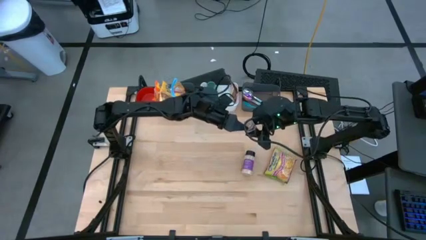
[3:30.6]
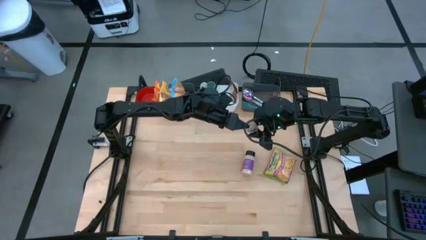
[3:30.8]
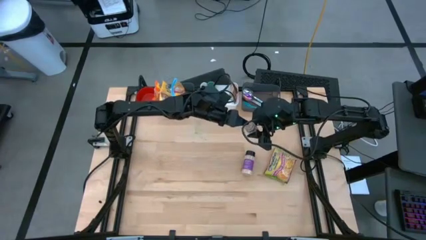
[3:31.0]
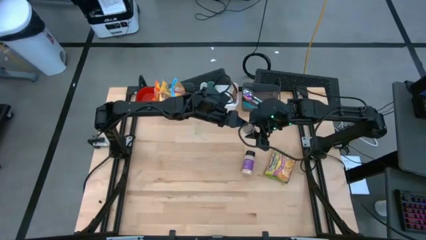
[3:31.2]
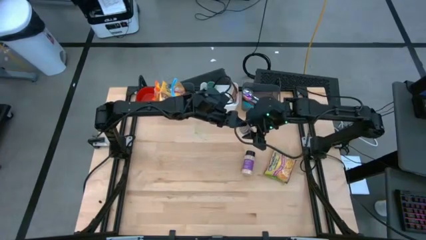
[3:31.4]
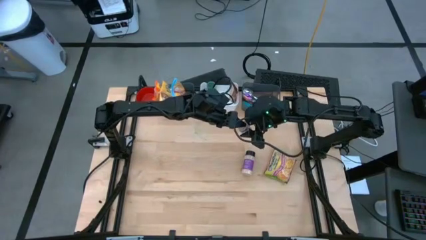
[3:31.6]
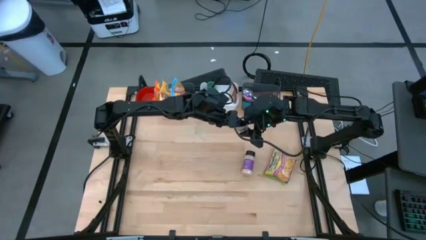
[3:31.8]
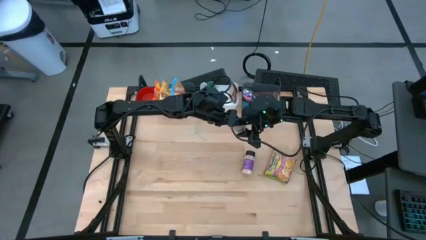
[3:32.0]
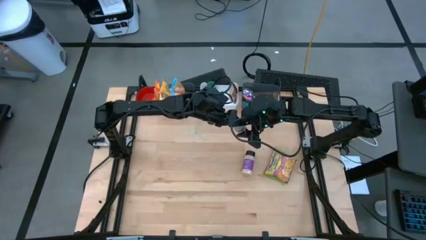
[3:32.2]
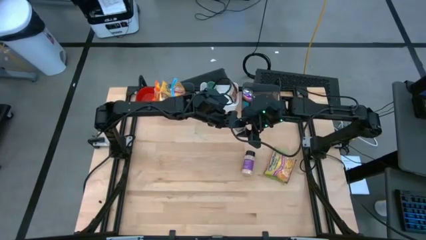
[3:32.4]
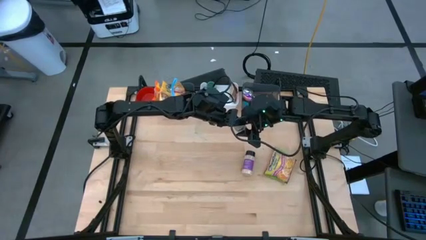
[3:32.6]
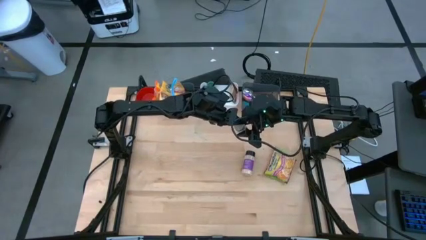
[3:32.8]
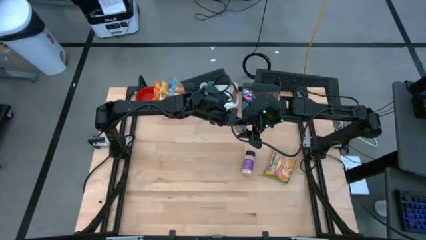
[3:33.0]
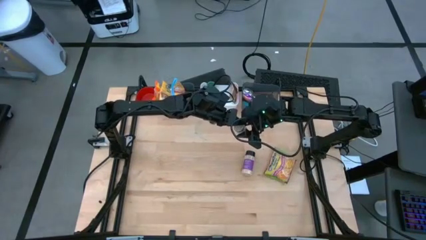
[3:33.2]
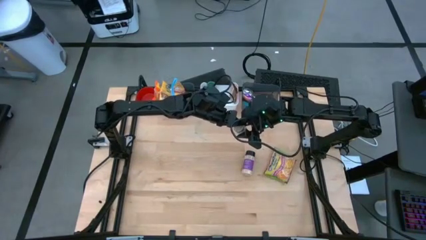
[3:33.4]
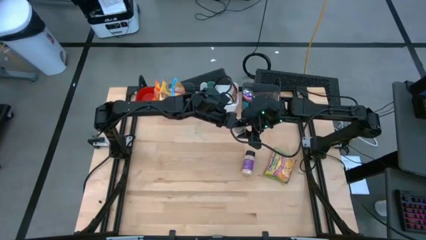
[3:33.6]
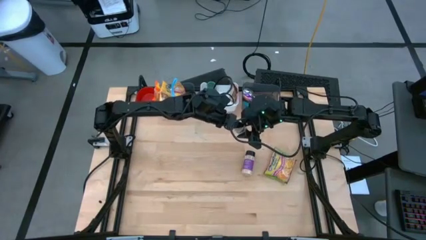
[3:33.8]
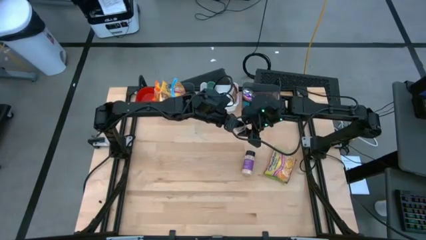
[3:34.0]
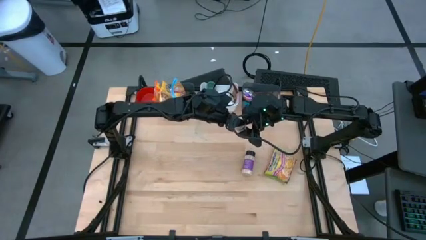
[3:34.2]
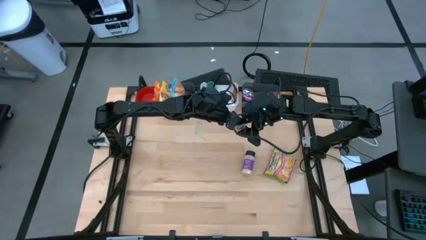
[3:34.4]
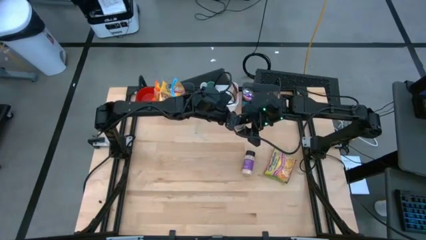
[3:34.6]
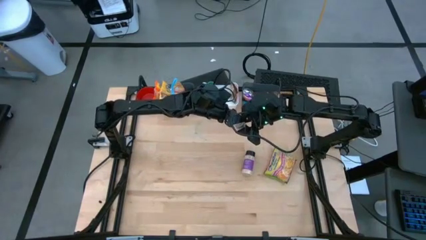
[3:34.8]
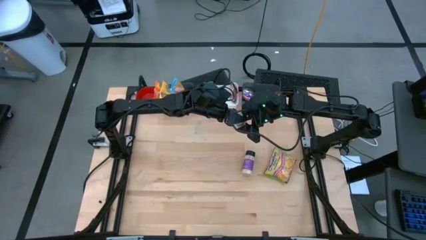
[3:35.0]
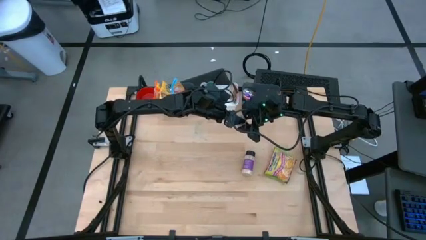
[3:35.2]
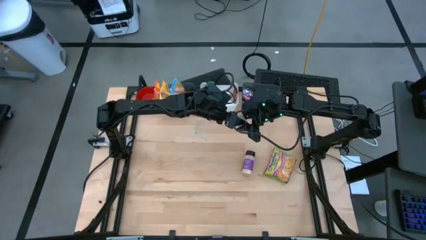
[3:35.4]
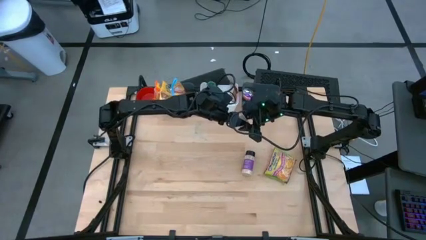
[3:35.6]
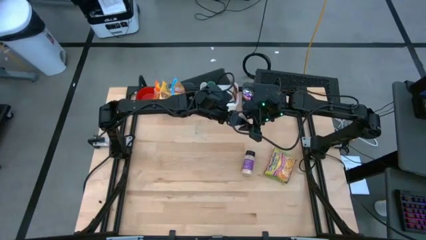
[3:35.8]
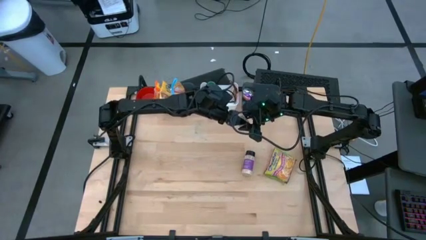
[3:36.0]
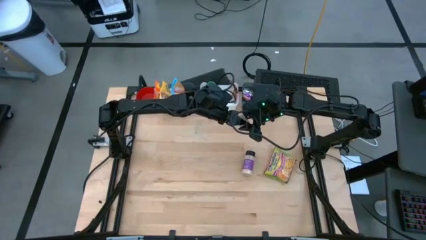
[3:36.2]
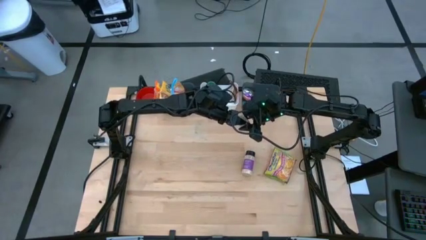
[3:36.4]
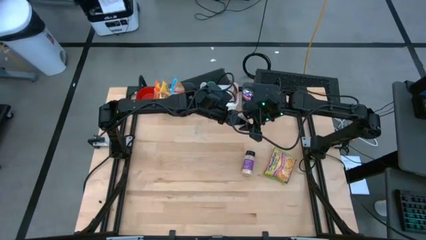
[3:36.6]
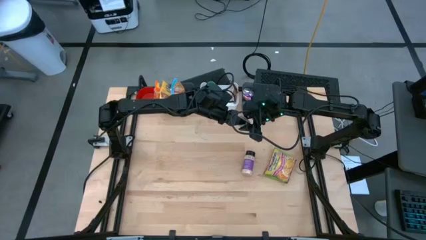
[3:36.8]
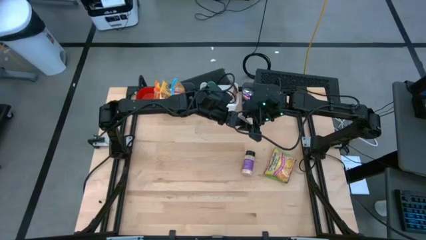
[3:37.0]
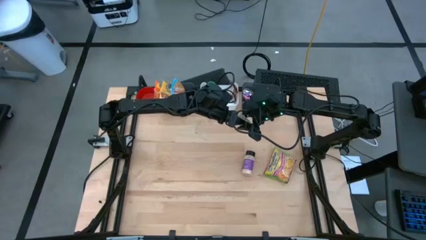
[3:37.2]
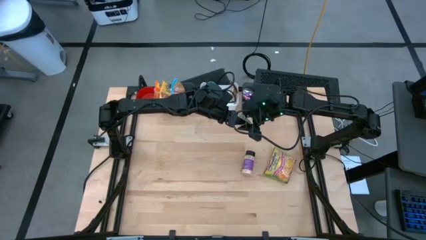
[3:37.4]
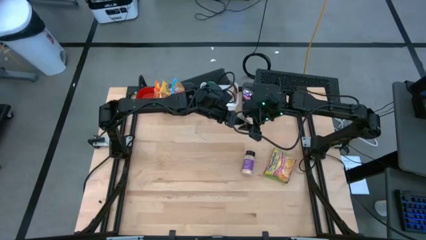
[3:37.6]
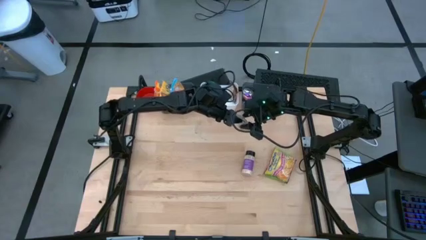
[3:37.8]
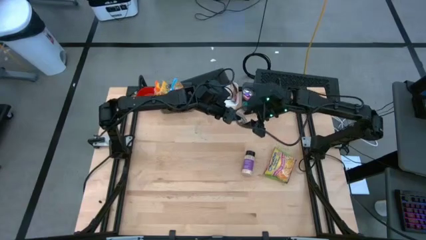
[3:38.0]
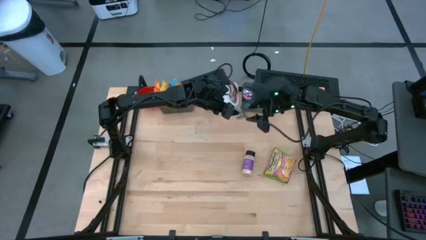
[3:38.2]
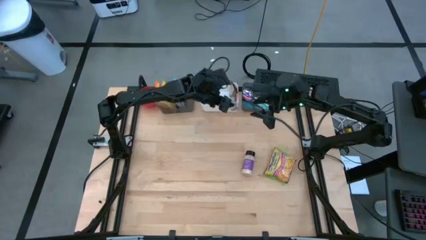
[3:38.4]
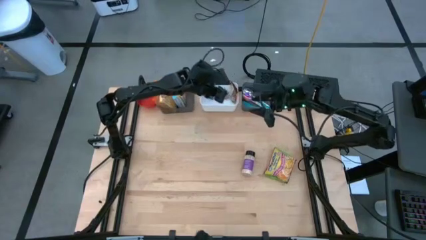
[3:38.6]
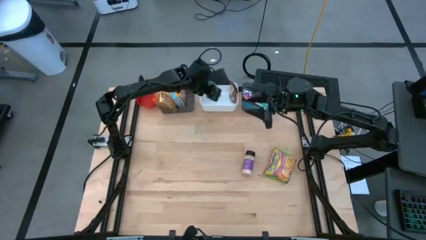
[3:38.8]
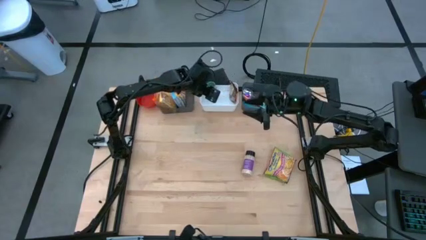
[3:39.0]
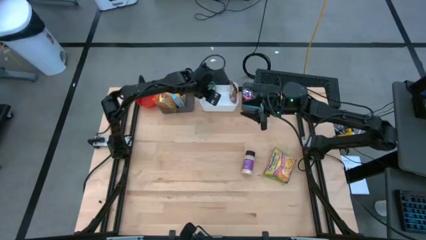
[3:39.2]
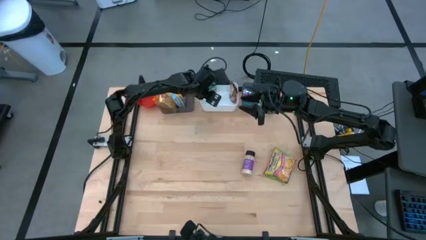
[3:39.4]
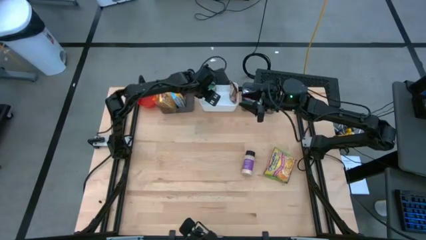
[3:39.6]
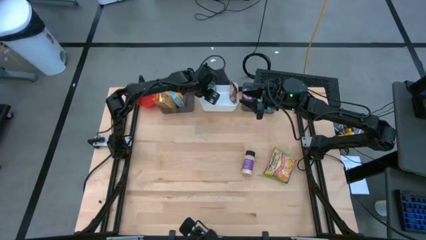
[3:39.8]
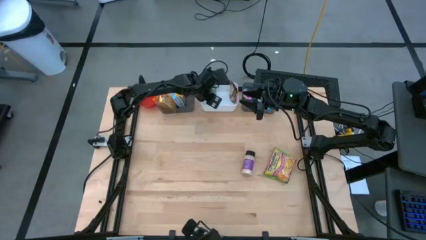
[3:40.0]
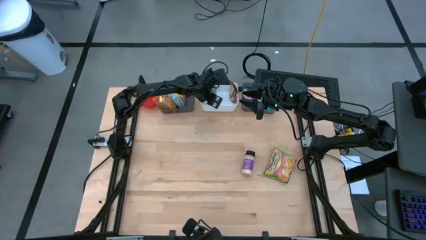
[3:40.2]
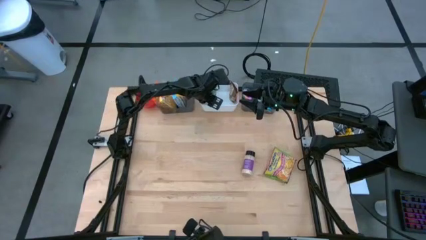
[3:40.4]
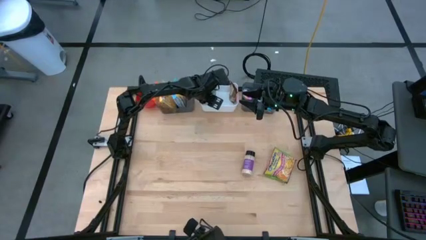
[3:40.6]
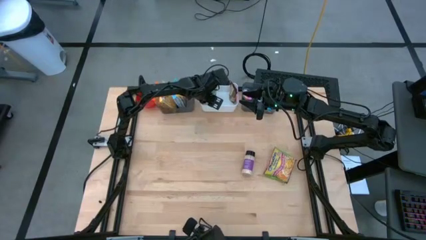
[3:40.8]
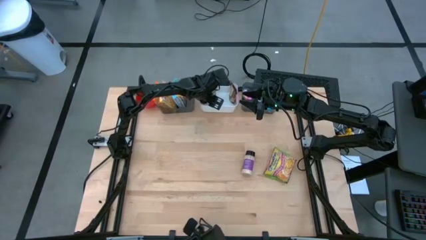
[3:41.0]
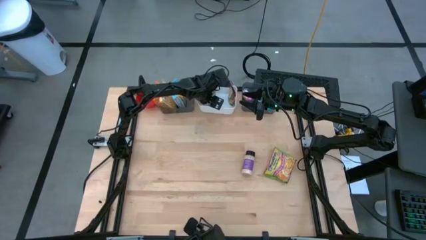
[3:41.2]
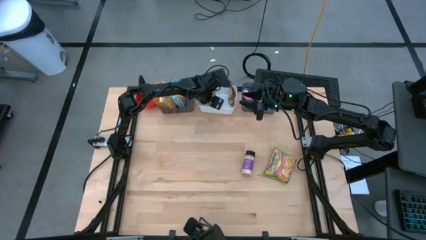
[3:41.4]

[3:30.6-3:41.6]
Task: Pick & Place Food Item
Put the brown seasoning bottle into the white bin
